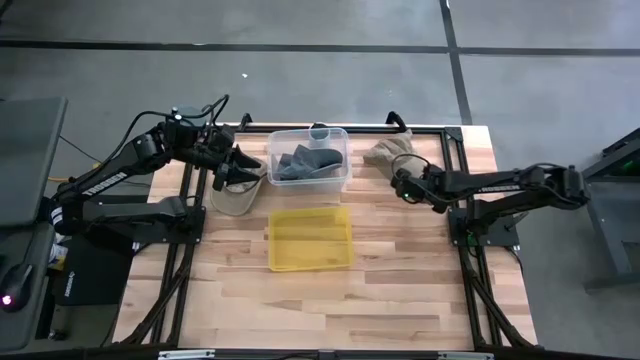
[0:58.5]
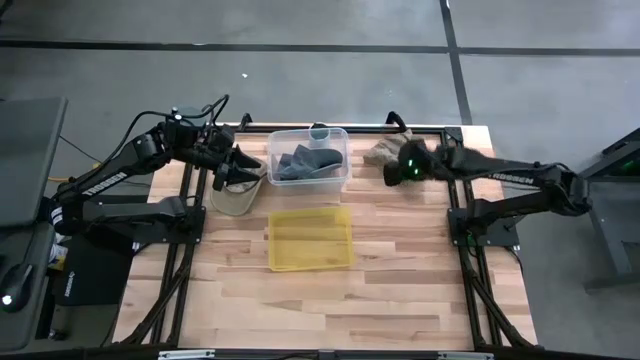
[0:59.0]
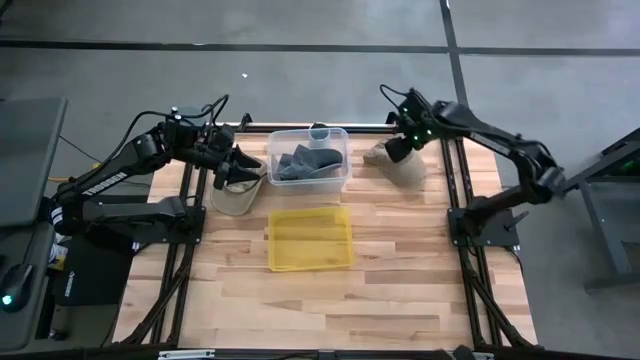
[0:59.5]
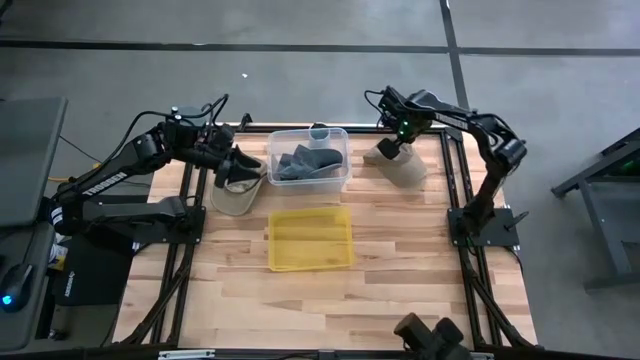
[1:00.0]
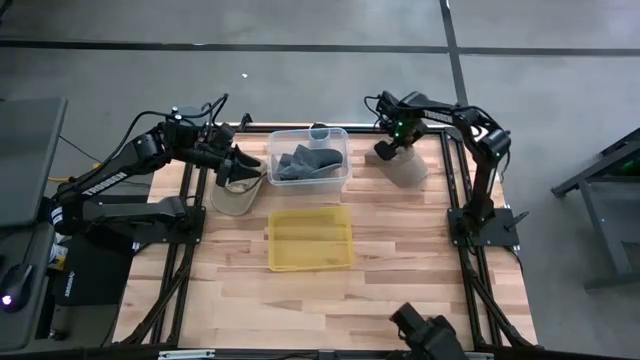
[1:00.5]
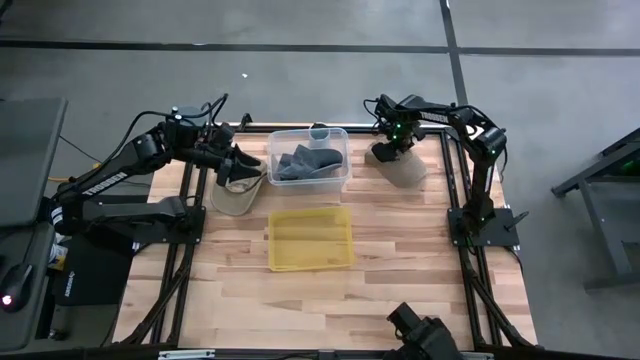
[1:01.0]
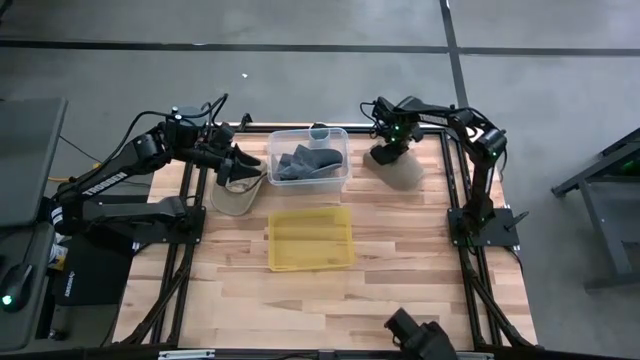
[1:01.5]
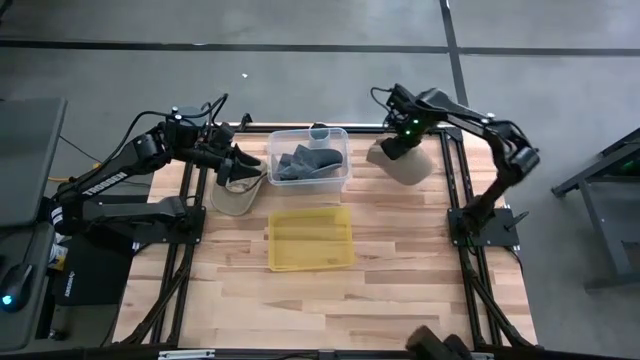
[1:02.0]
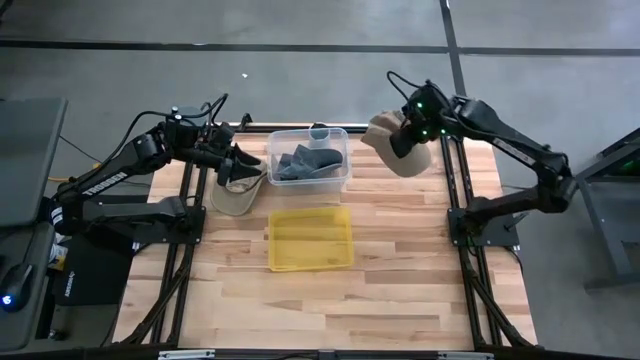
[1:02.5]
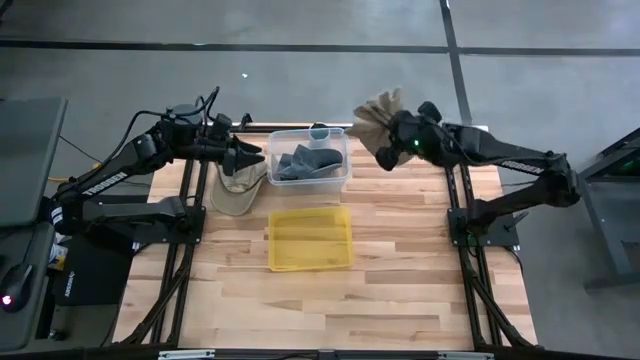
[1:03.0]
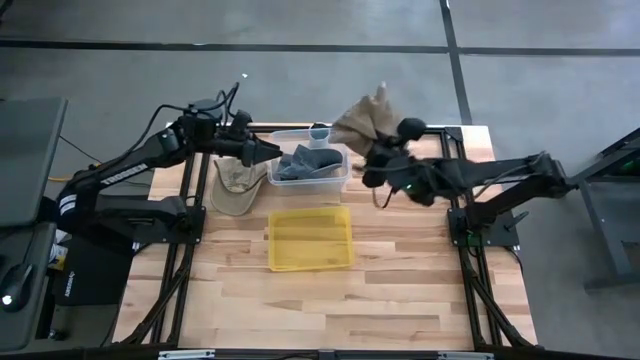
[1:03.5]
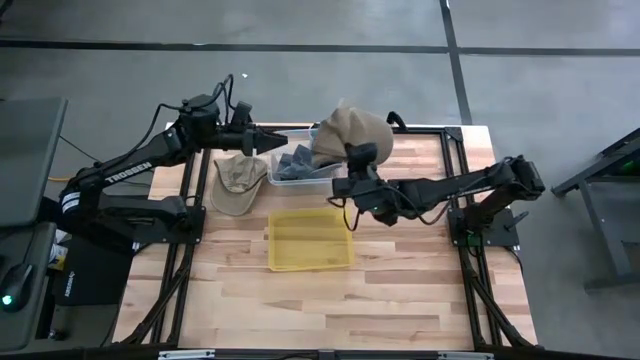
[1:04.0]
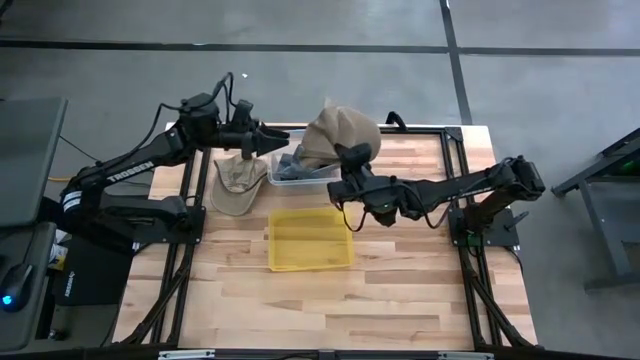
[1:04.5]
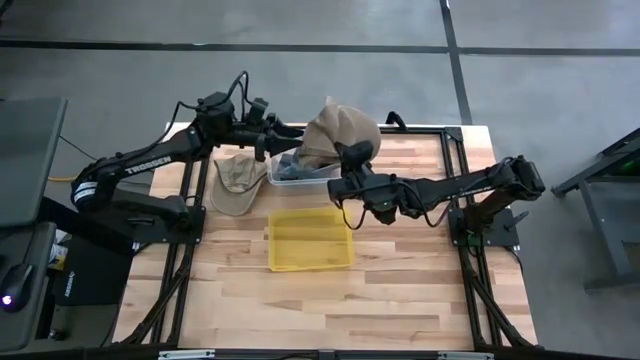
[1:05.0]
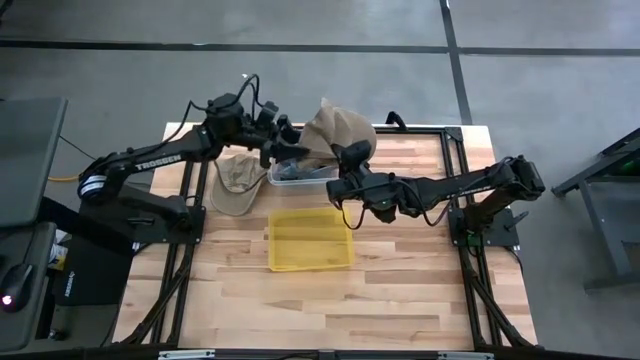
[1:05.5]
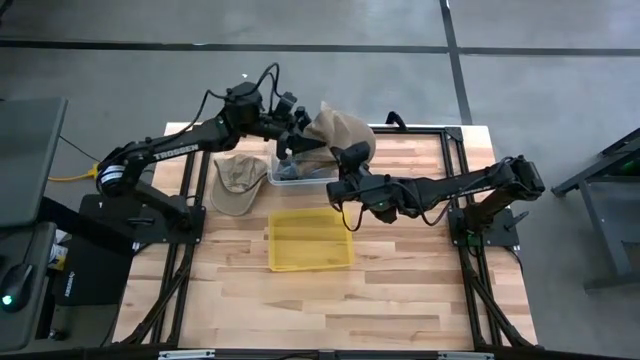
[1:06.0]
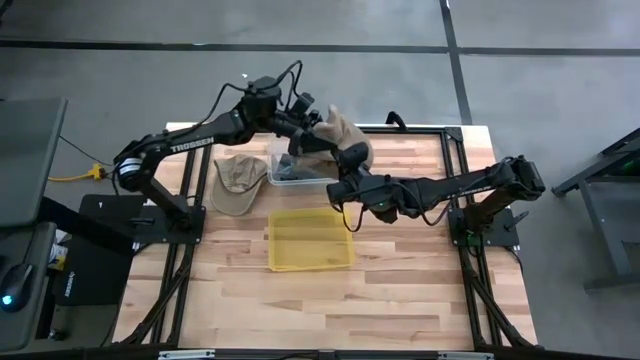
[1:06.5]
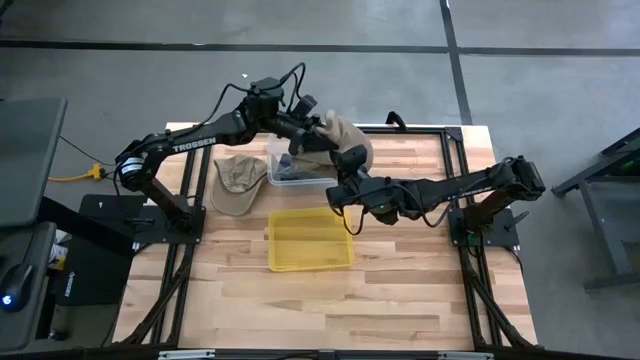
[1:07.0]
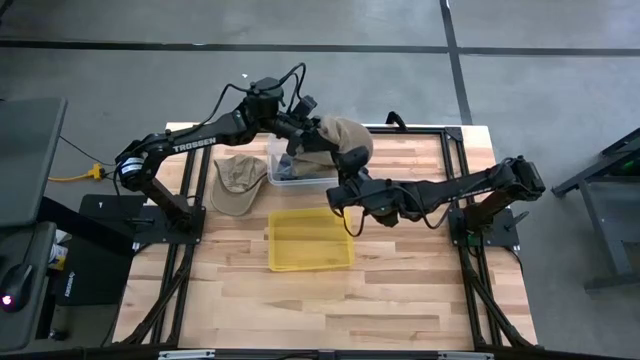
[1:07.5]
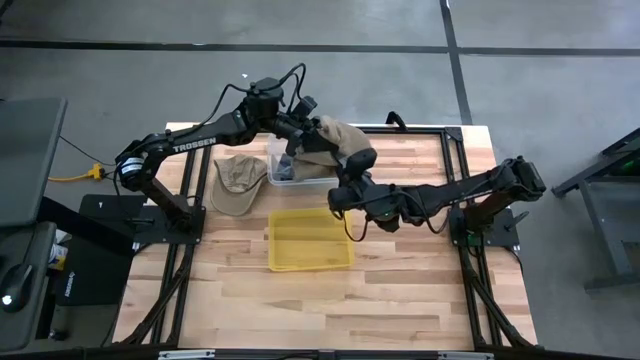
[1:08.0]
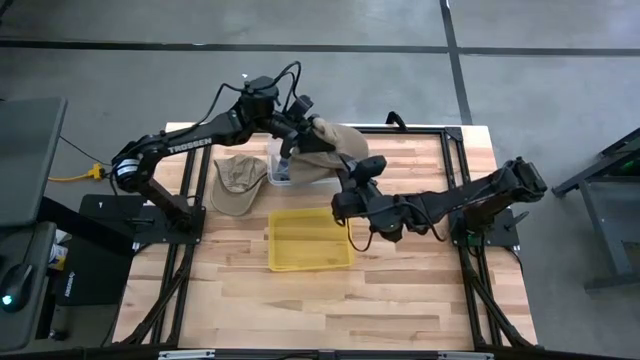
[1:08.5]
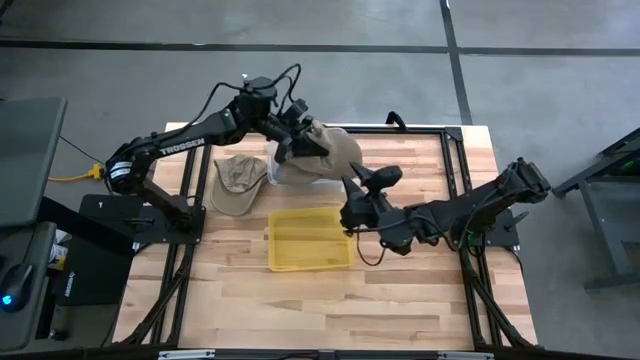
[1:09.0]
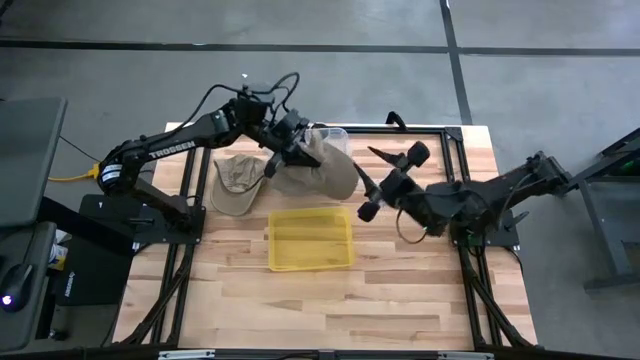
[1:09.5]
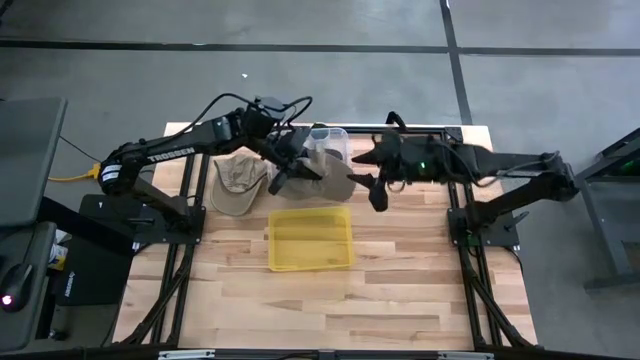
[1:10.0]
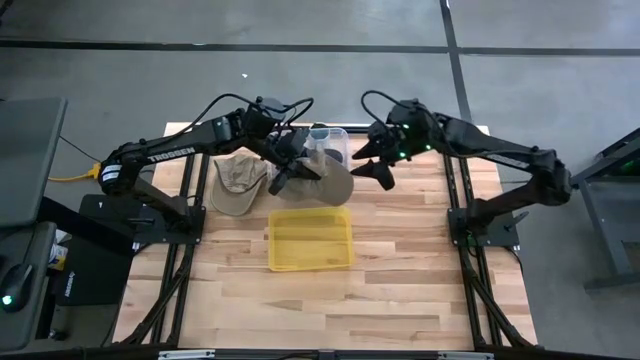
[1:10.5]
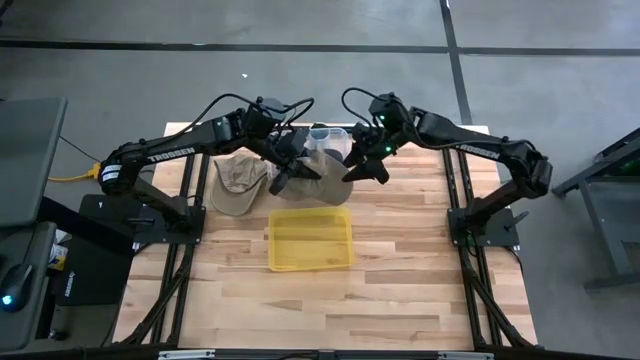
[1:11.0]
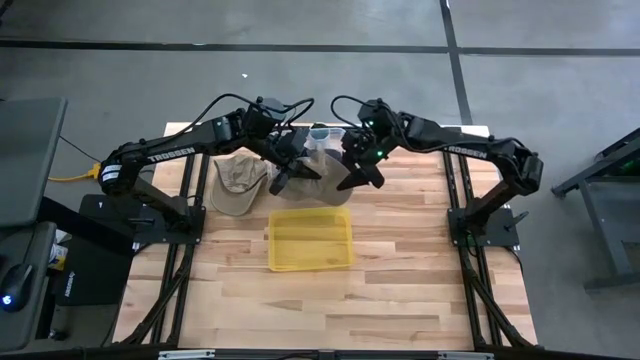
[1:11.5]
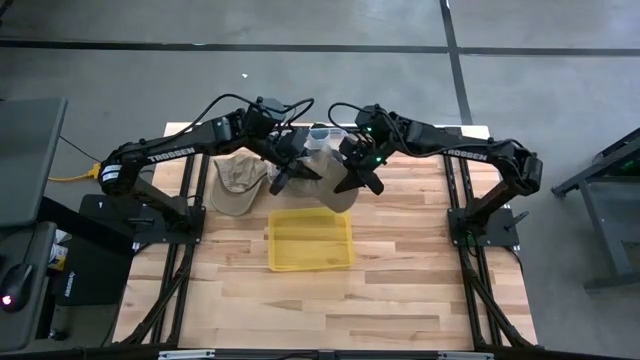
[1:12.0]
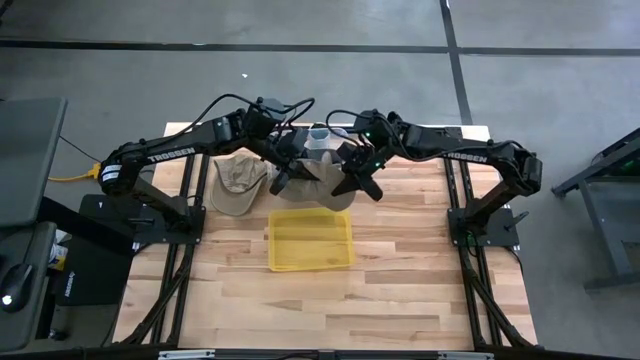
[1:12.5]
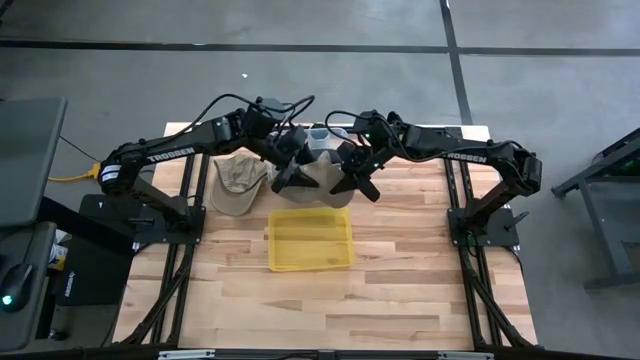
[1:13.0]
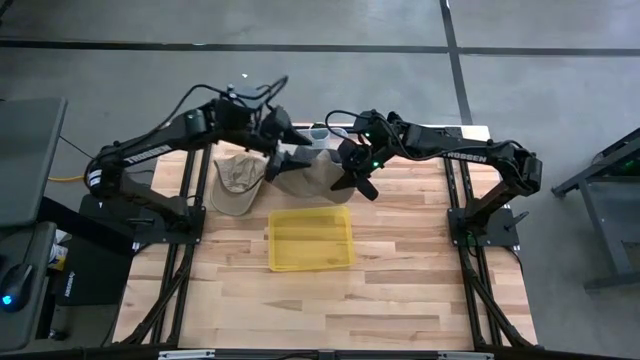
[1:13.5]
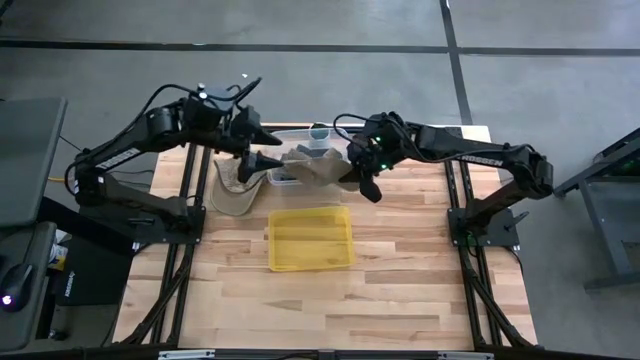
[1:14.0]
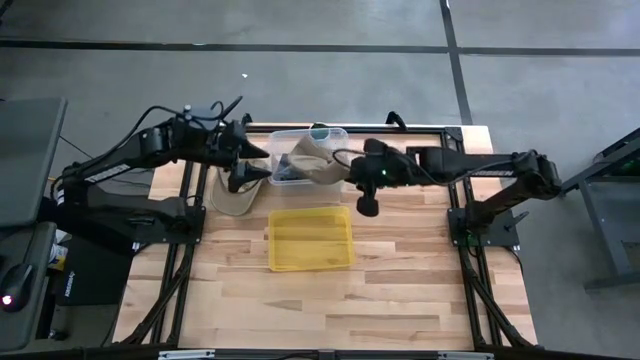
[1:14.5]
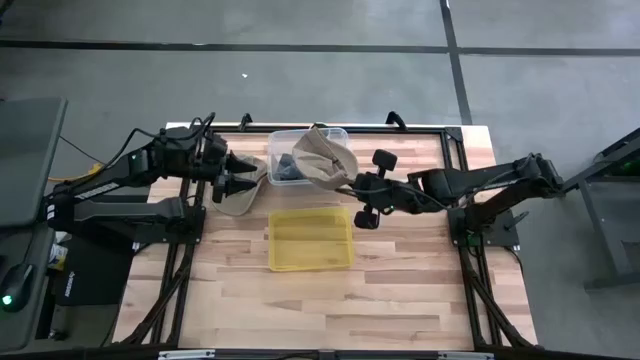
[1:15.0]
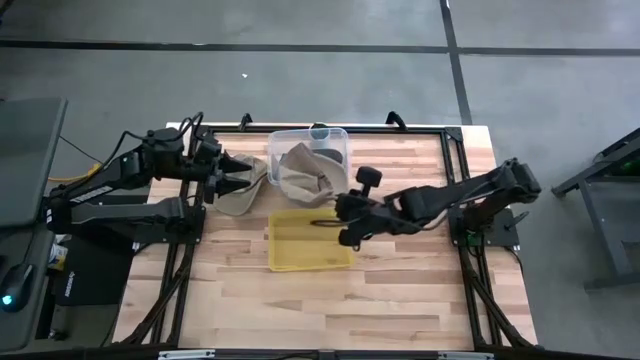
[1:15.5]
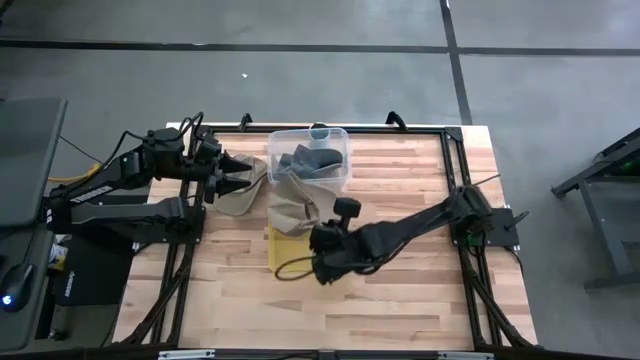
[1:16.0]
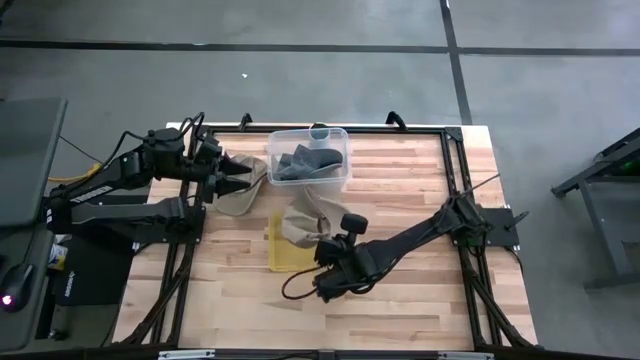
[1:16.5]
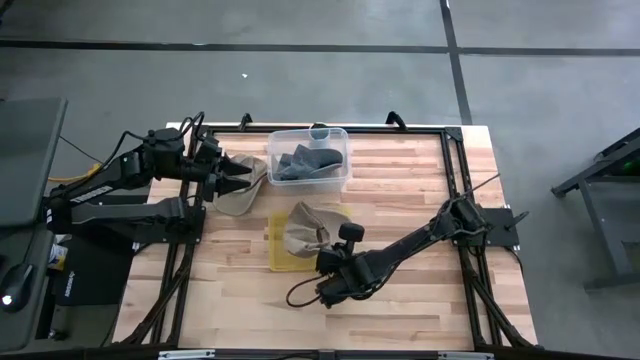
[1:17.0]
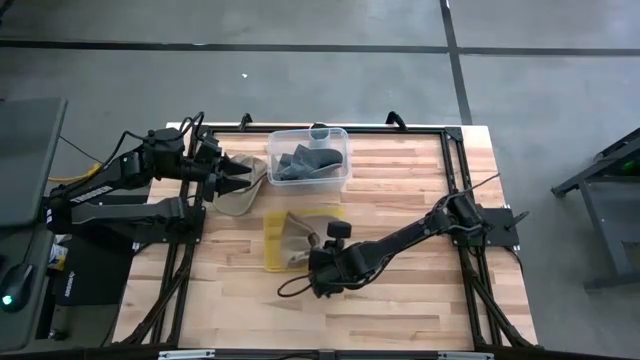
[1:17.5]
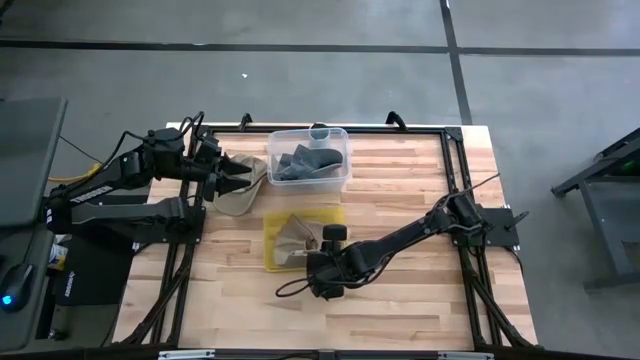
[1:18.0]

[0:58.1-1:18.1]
Task: Pick & Place hat
Put the right brown cap into the yellow bin
